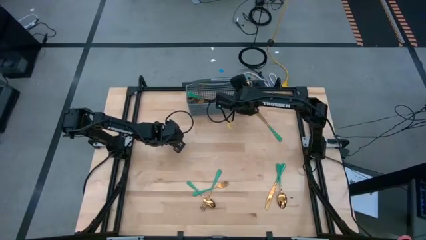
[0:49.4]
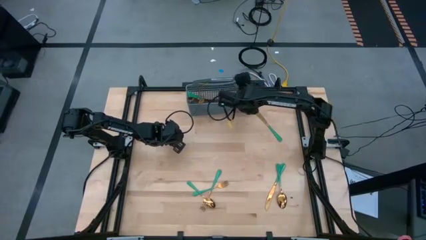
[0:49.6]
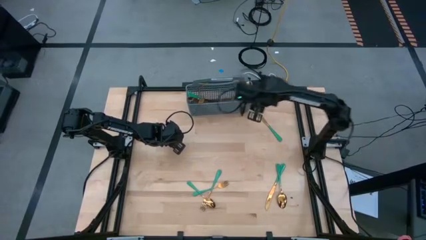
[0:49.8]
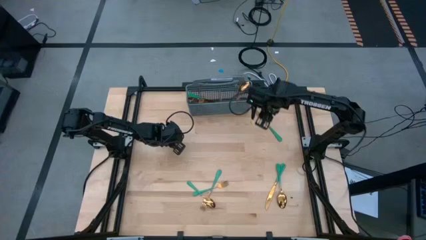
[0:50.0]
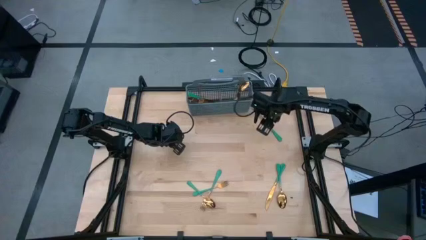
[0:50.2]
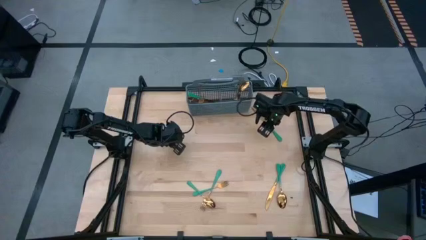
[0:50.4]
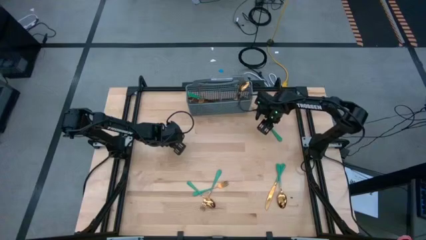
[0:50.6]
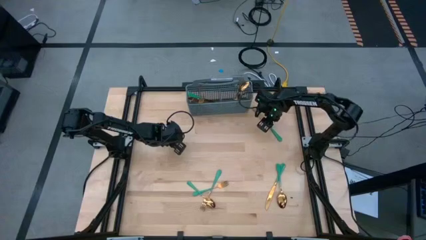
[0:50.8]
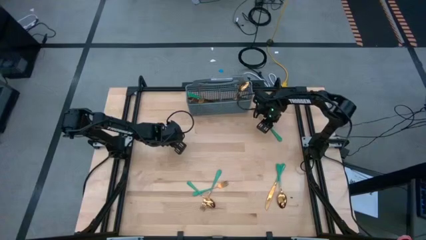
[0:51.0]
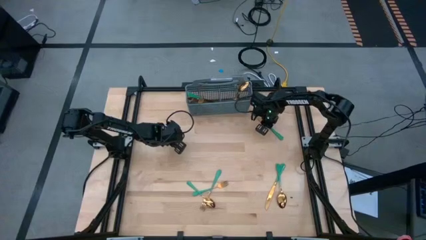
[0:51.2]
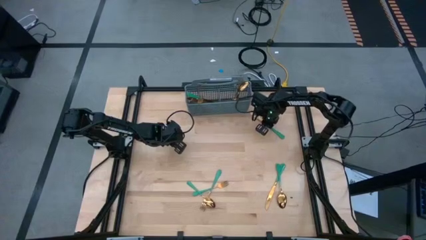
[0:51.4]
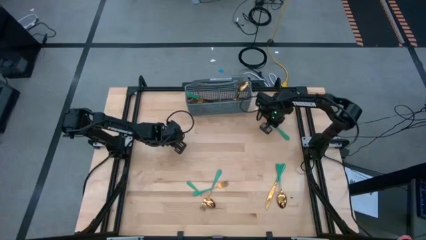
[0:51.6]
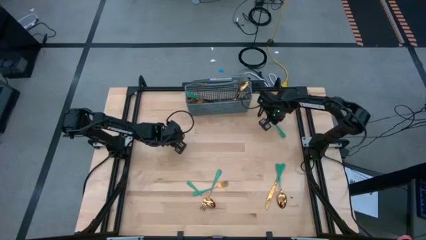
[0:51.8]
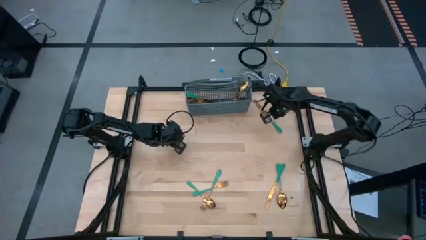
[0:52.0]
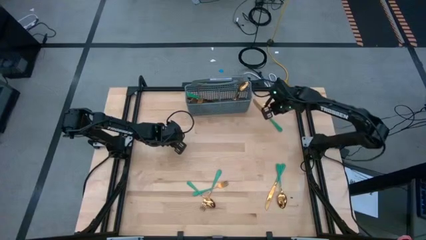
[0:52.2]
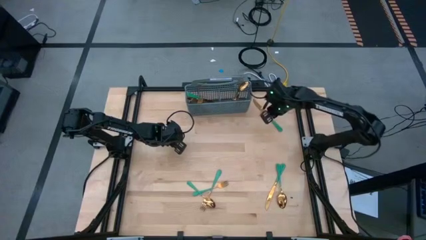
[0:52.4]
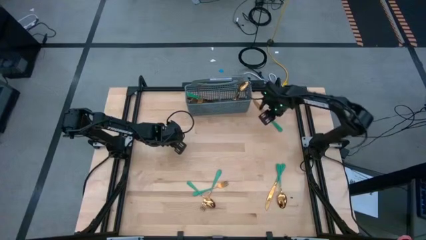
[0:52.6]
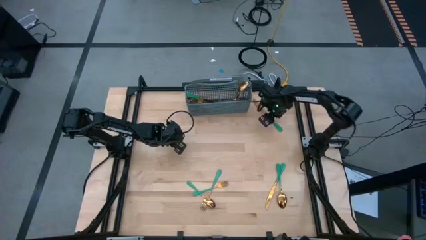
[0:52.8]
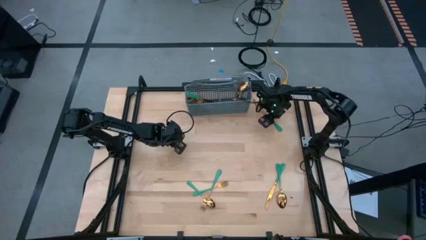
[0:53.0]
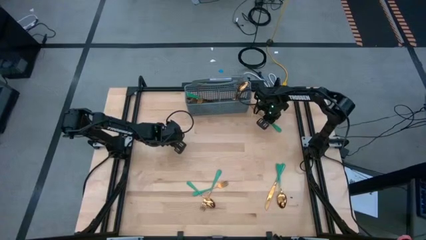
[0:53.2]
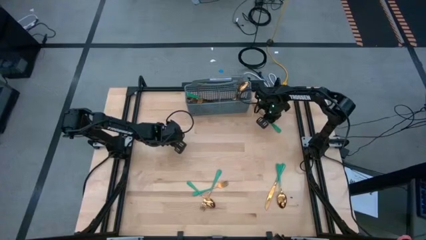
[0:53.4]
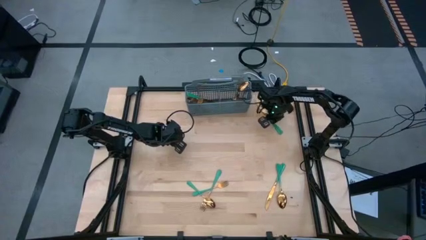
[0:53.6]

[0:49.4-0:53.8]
Task: Sort silverware
Put the gold knife into the middle left section of the gray utensil holder

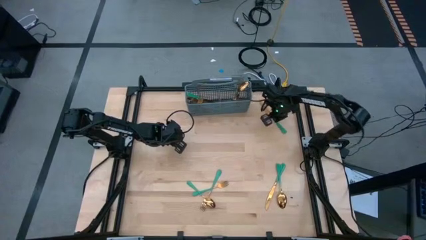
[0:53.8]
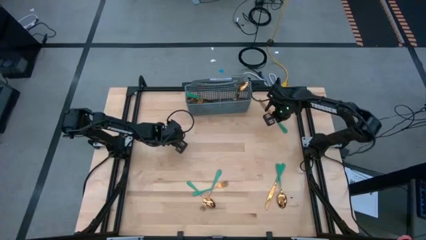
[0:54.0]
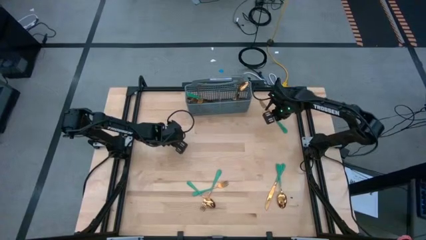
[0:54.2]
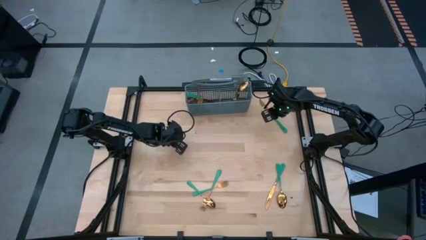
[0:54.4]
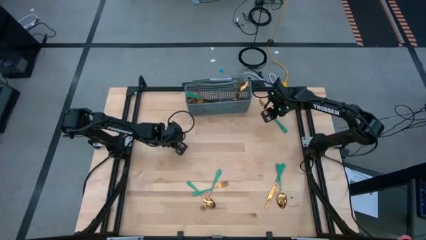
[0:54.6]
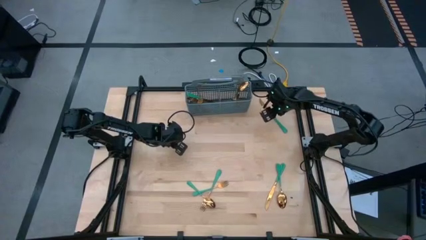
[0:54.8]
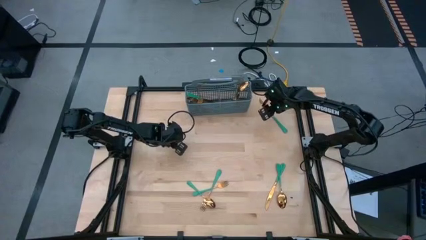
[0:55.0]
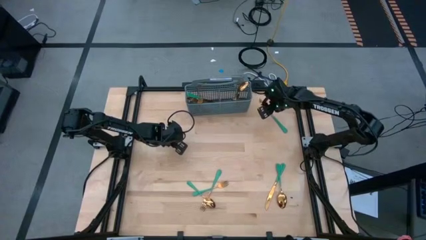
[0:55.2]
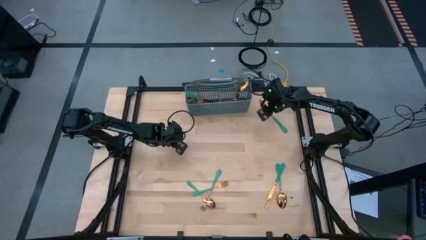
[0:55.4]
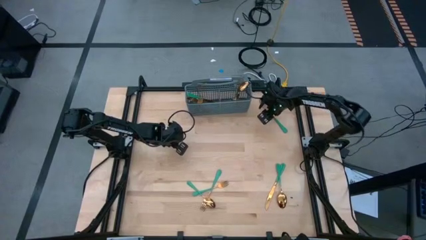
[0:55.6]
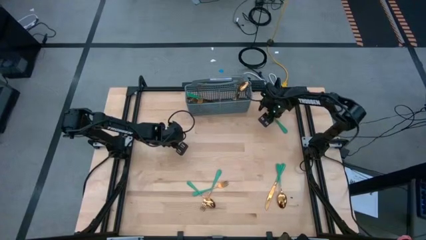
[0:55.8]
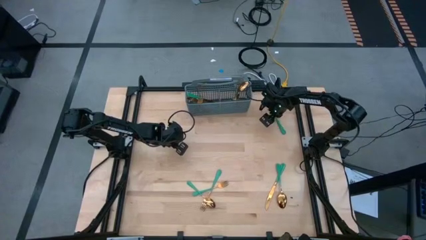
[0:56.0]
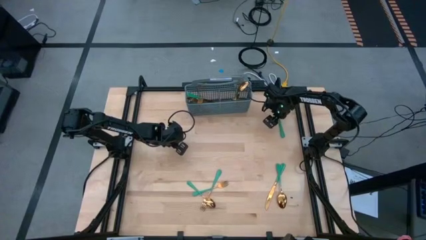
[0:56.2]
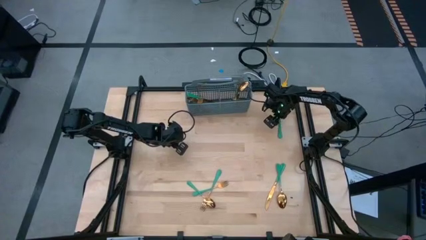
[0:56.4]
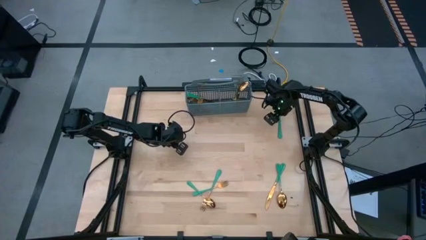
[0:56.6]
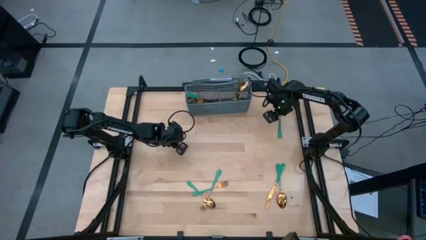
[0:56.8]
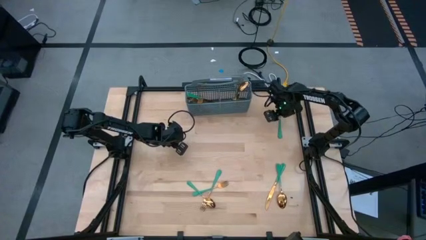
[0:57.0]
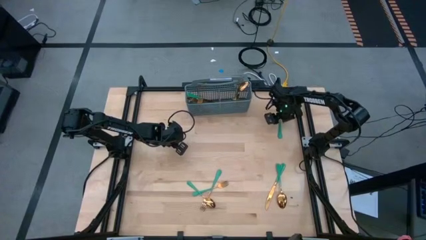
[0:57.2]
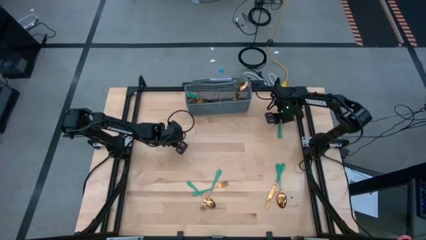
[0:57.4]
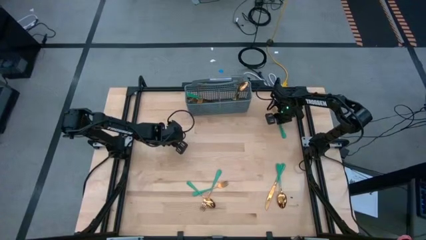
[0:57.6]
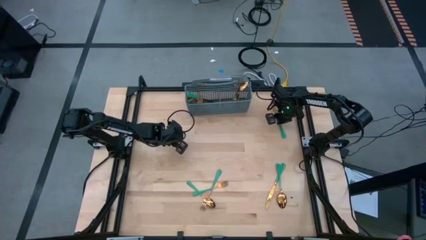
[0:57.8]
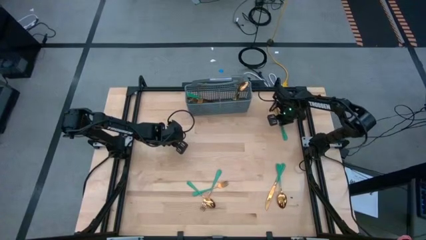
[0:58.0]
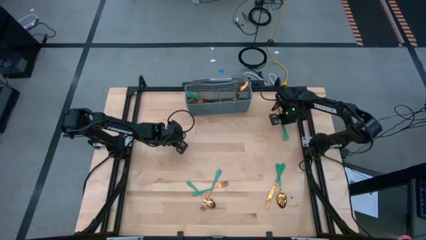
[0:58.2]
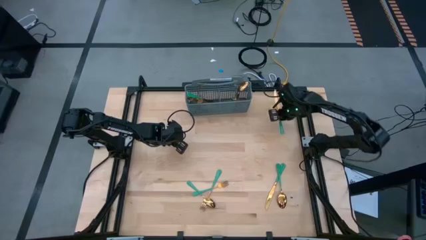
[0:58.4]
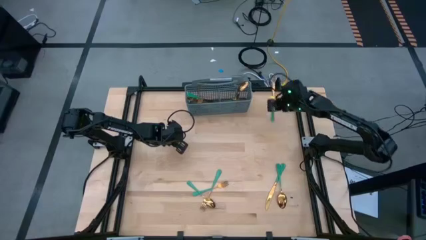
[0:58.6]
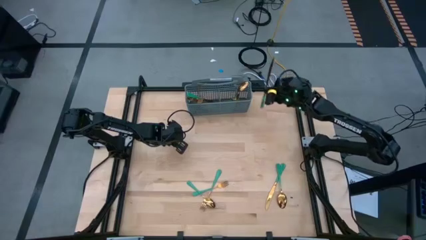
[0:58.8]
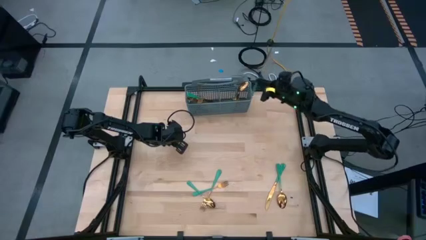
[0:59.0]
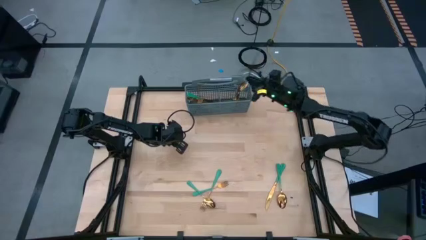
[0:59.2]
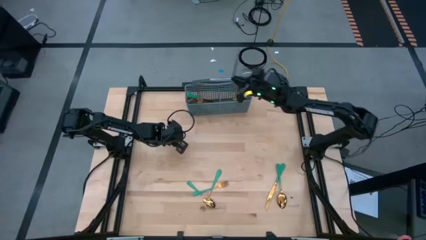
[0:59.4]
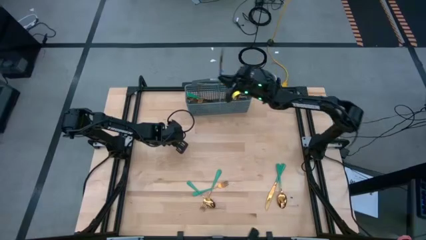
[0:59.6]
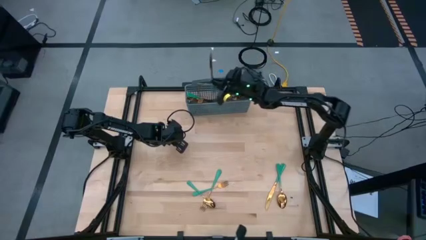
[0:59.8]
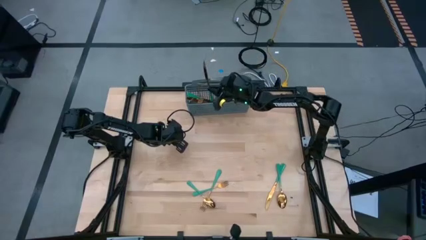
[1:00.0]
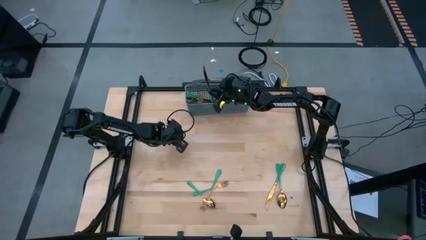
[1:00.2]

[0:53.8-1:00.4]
Put the gold knife into the middle left section of the gray utensil holder

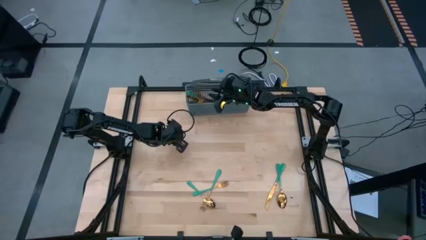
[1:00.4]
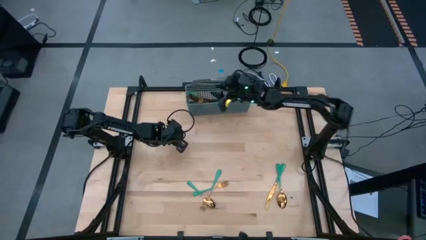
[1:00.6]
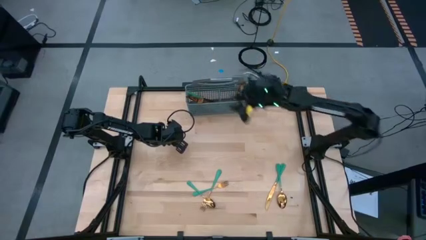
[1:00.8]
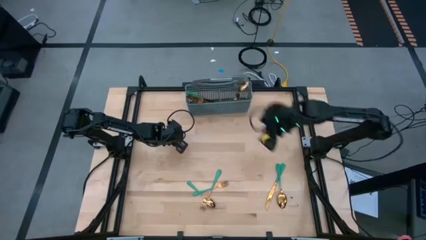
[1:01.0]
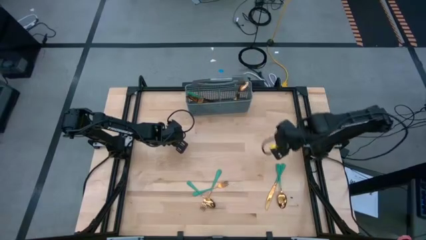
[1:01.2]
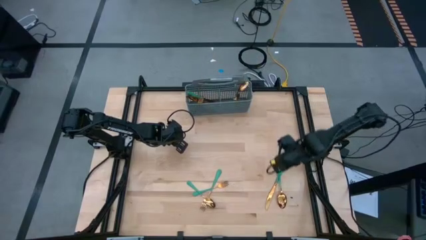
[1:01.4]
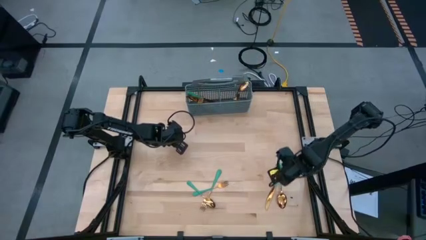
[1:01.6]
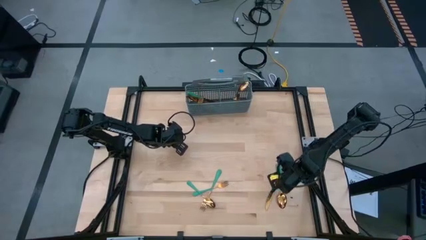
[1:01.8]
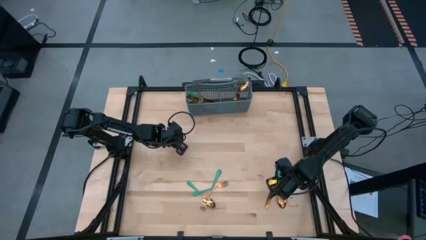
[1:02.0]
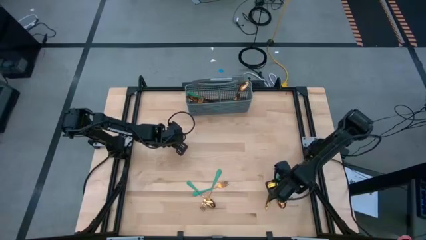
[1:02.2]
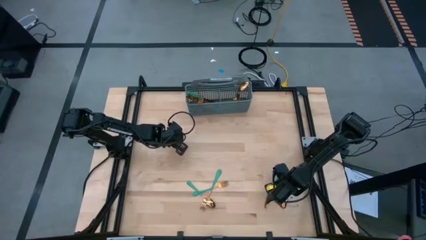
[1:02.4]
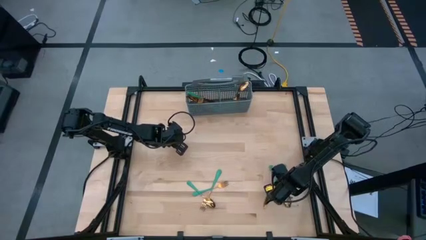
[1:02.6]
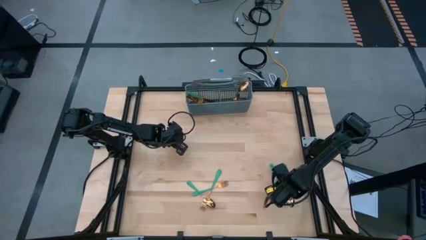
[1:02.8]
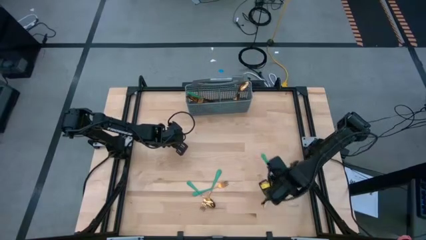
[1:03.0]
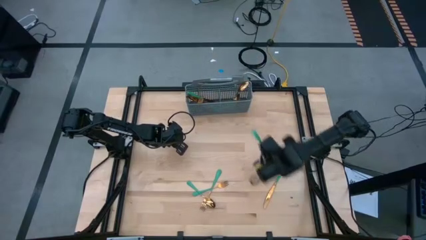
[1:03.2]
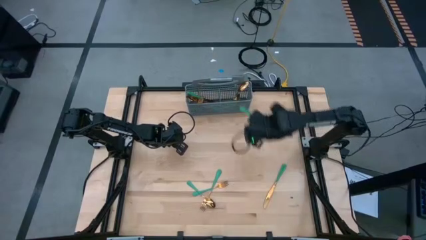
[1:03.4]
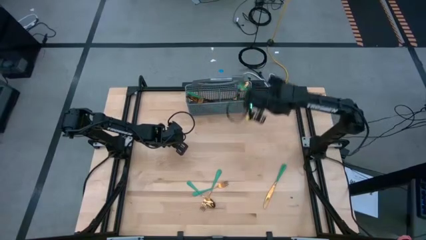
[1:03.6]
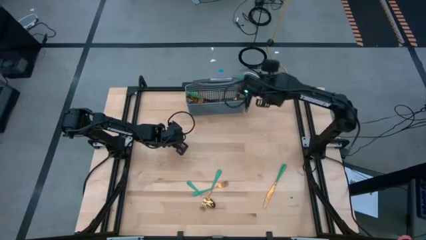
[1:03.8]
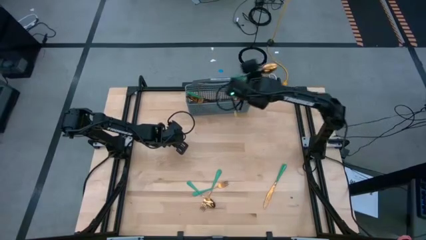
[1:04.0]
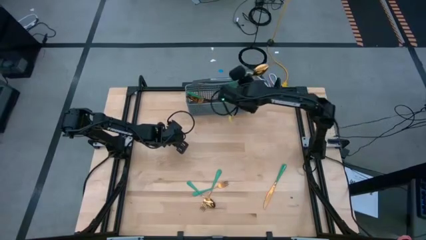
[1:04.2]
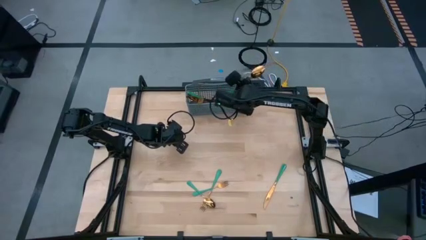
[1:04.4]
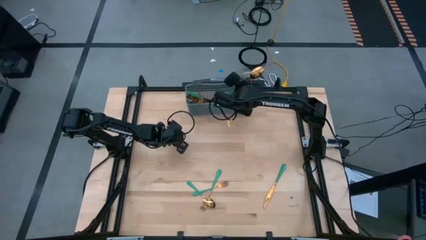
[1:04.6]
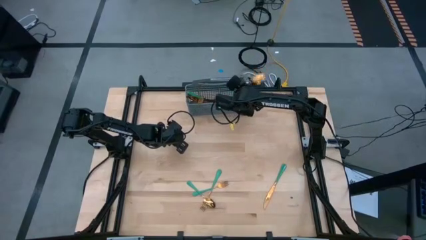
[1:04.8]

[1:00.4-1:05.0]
Put the gold spoon into the middle right section of the gray utensil holder

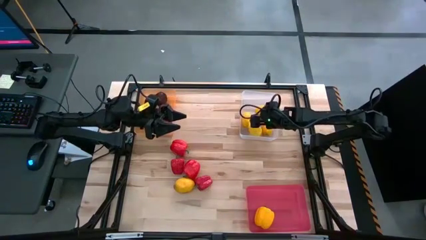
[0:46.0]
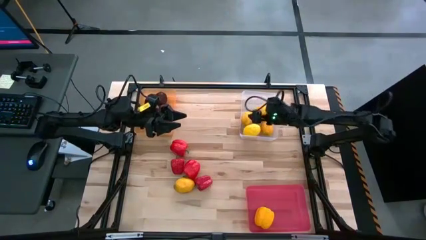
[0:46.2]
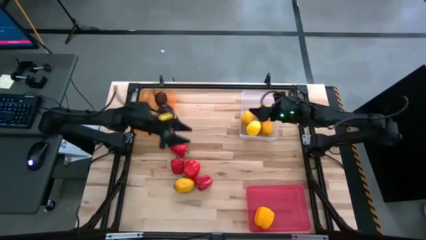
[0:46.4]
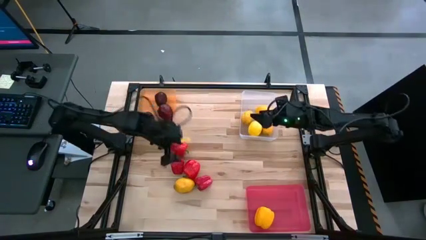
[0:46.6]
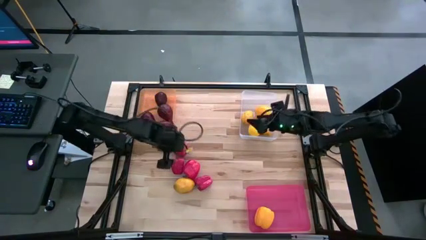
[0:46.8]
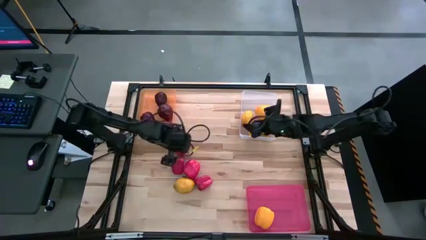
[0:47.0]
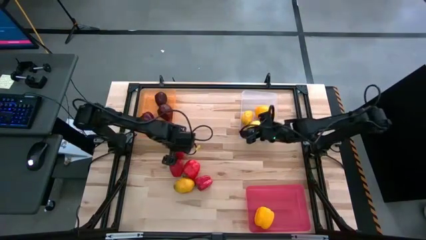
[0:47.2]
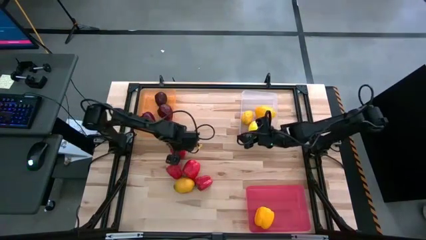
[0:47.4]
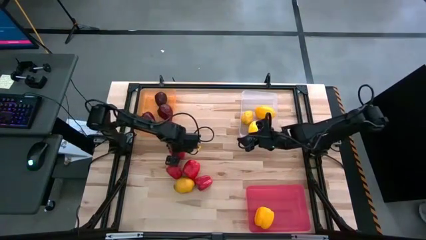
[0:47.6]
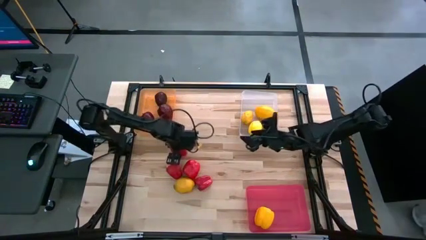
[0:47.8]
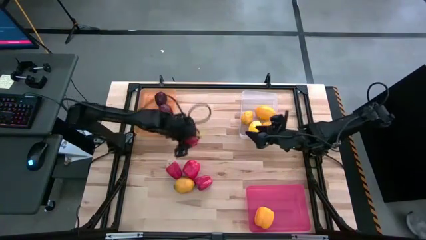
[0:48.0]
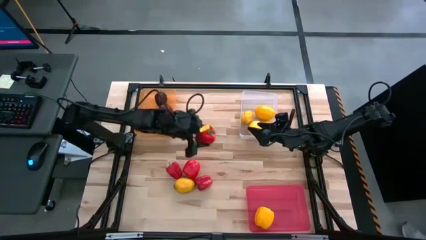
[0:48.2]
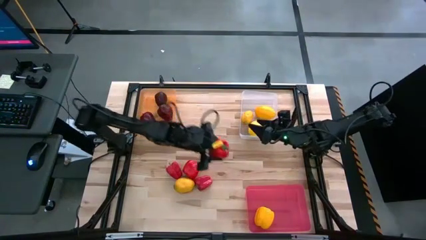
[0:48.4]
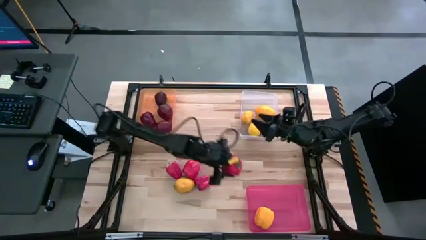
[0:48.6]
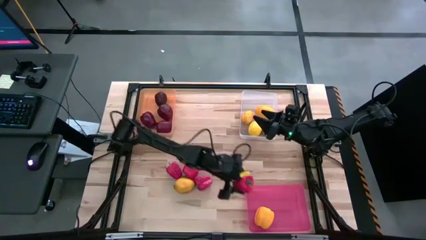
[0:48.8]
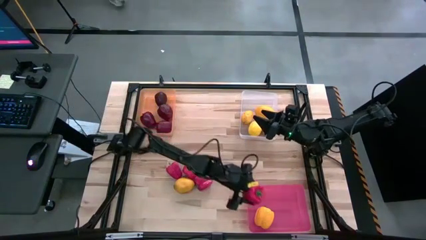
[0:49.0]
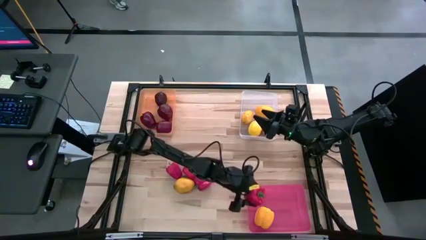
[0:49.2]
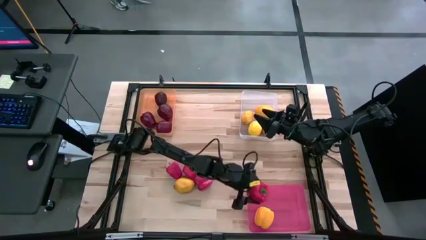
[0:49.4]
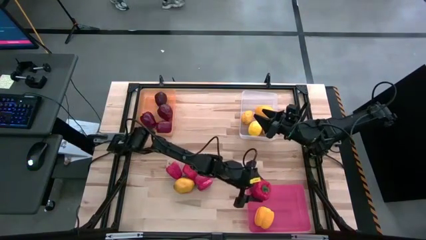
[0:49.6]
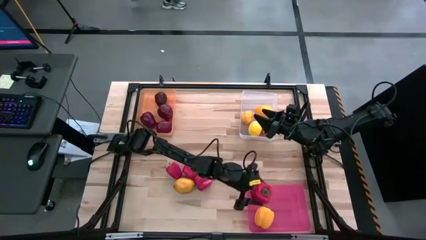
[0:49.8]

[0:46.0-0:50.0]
Task: Sort produce into baskets
Put the red bell pepper into the red bin
